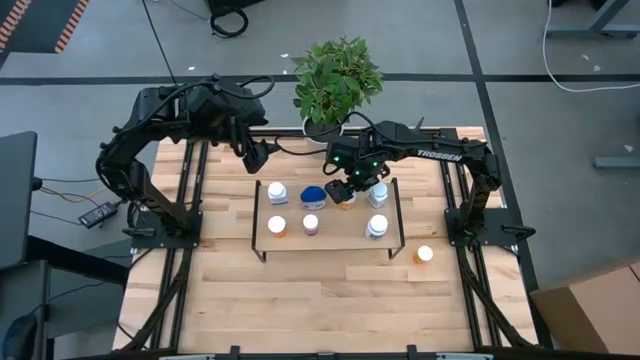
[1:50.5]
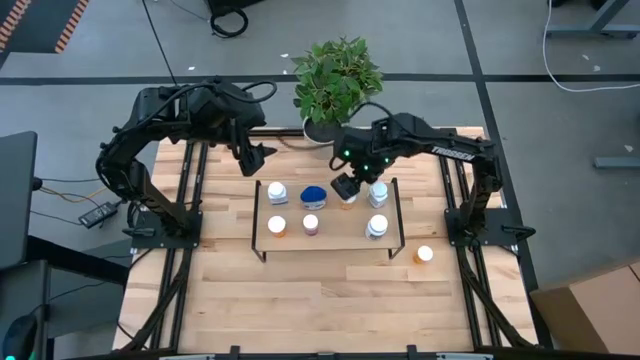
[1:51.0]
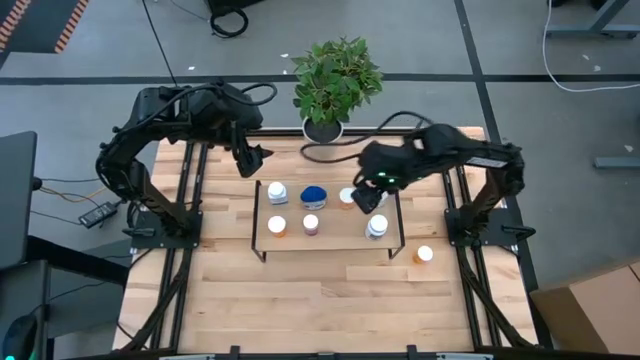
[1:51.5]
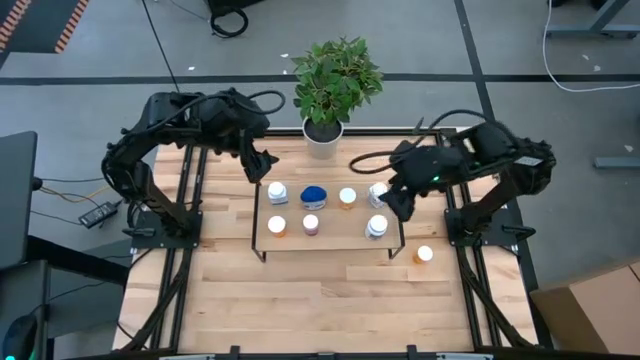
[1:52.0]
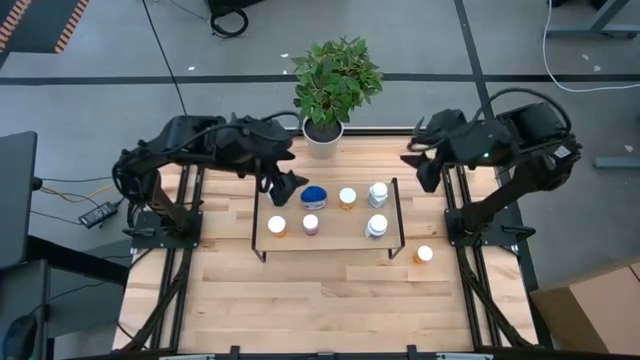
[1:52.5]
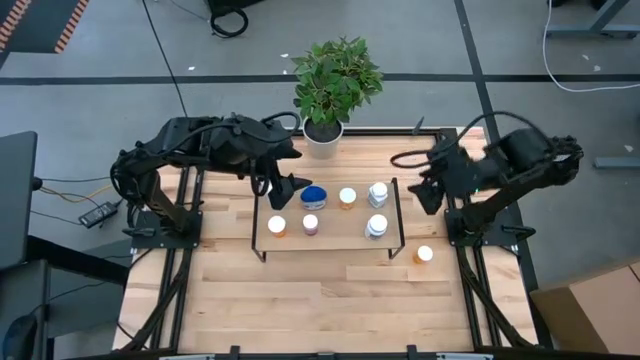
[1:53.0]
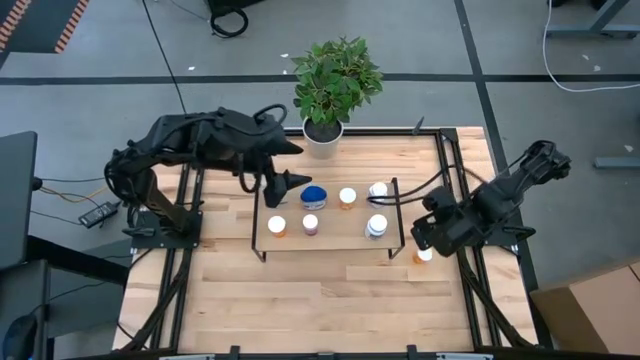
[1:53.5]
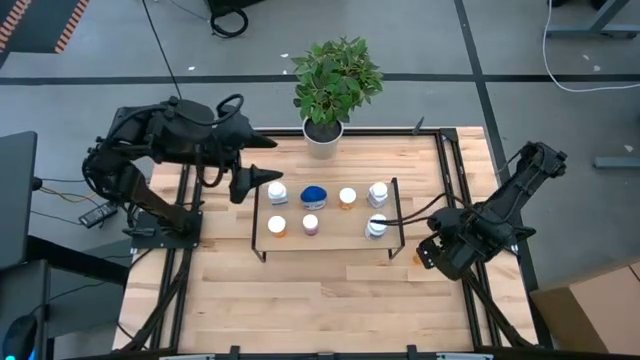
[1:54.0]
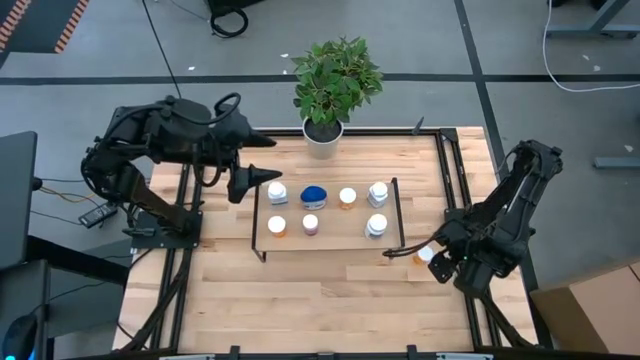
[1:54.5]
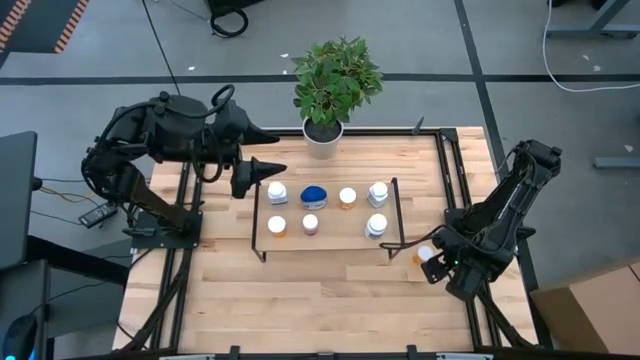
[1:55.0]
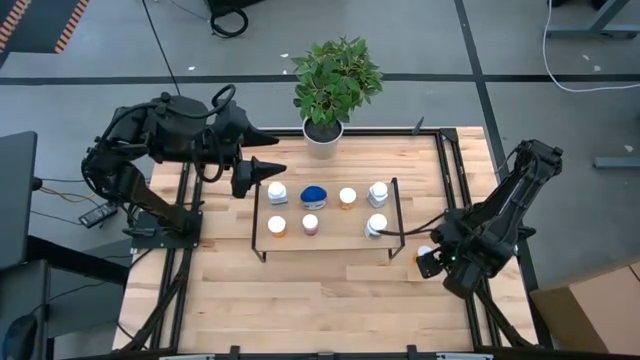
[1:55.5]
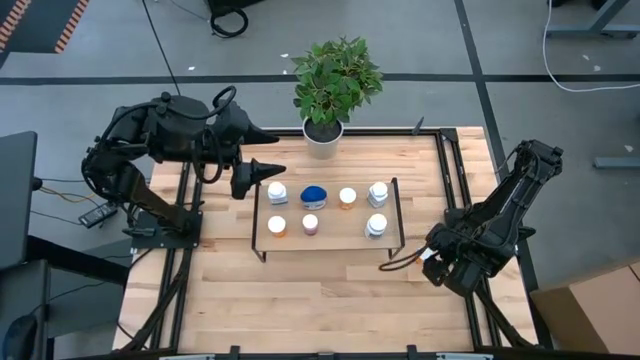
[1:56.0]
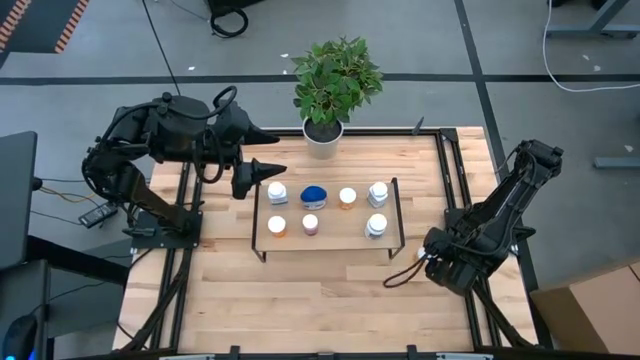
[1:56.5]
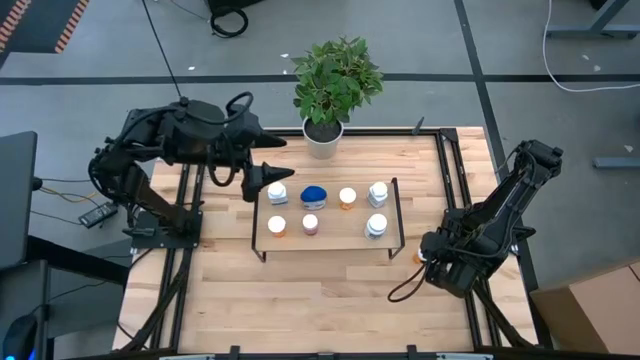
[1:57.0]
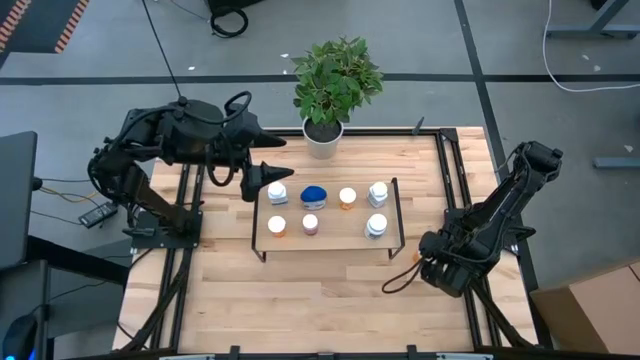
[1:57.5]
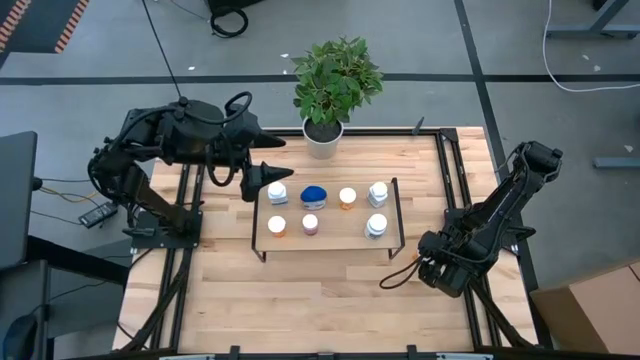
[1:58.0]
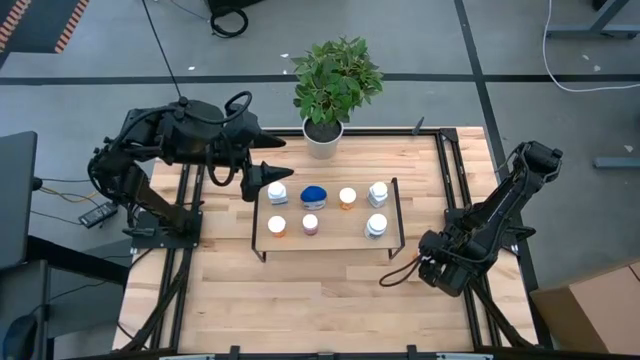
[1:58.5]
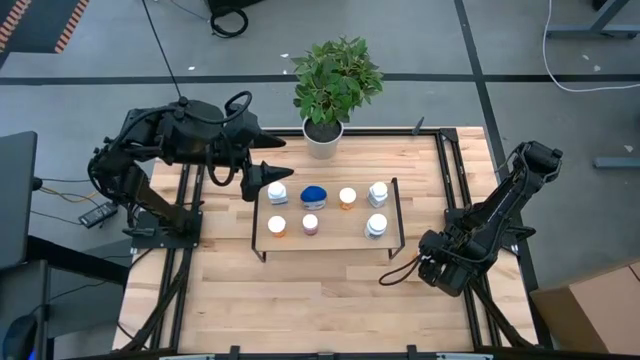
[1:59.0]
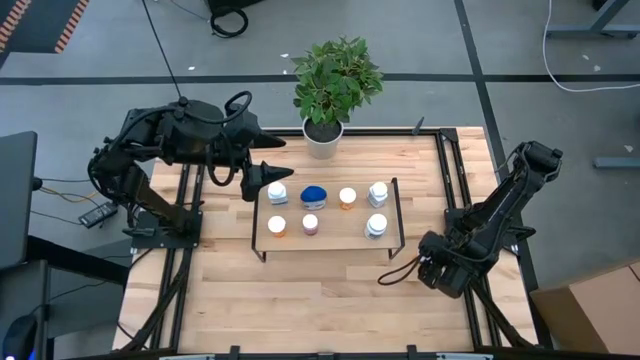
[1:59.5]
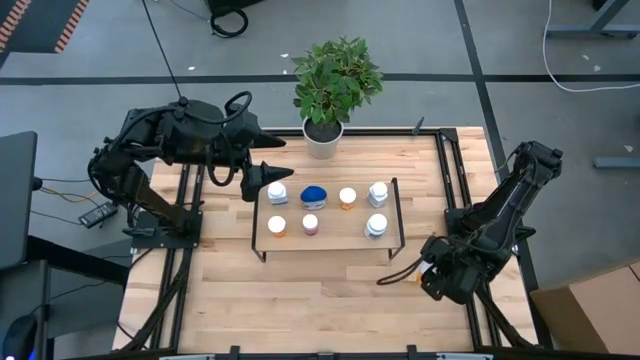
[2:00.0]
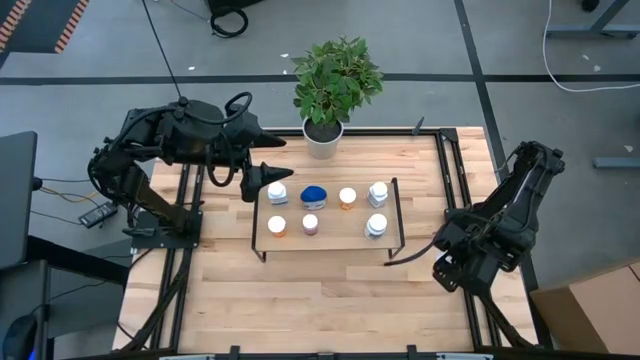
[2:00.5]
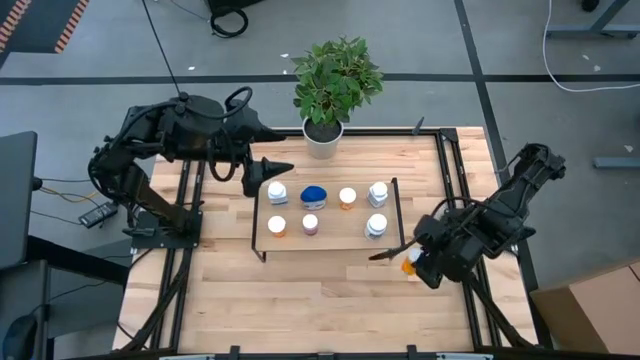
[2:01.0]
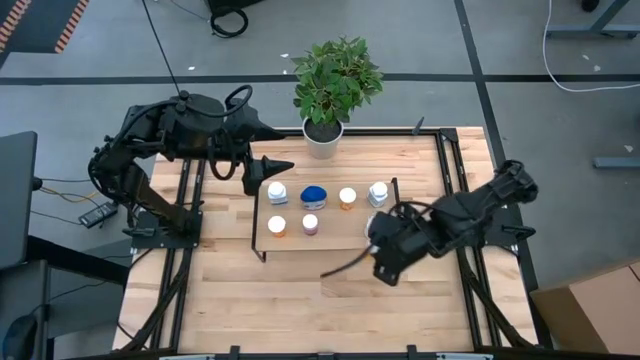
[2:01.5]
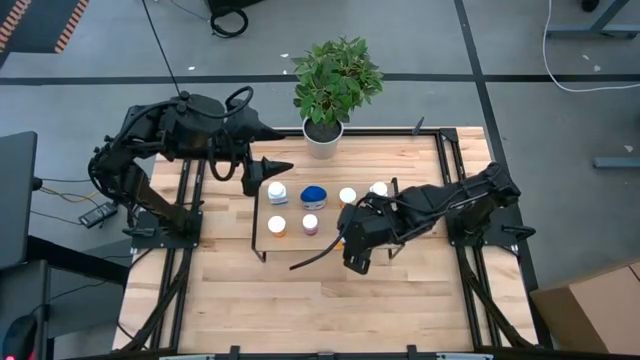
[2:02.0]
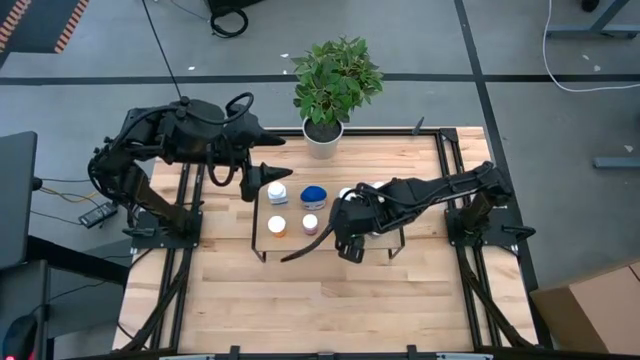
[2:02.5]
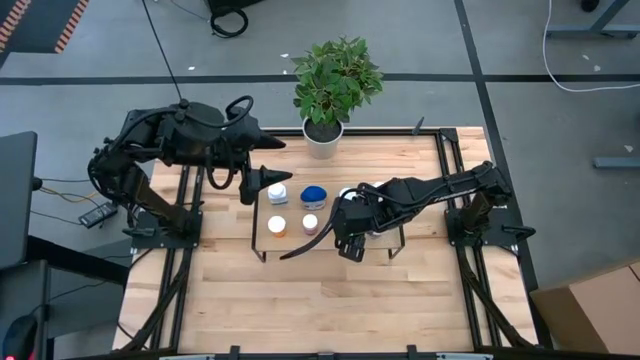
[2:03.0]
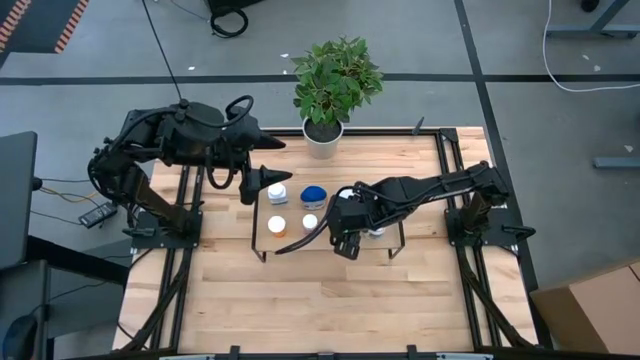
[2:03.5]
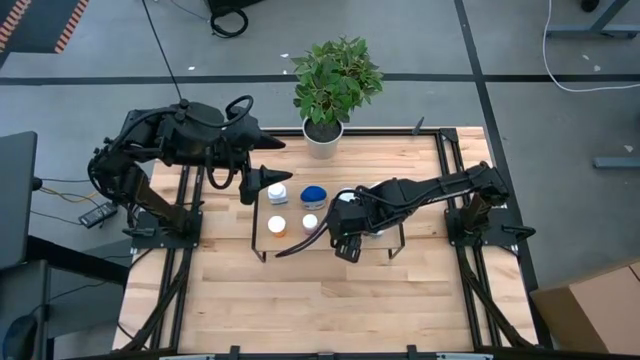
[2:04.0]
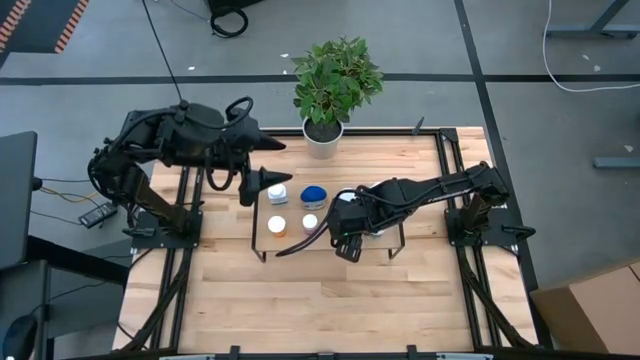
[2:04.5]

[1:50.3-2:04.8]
Task: Pick and place medicine bottles onto shelf by color
Put the orange pill bottle on the shelf

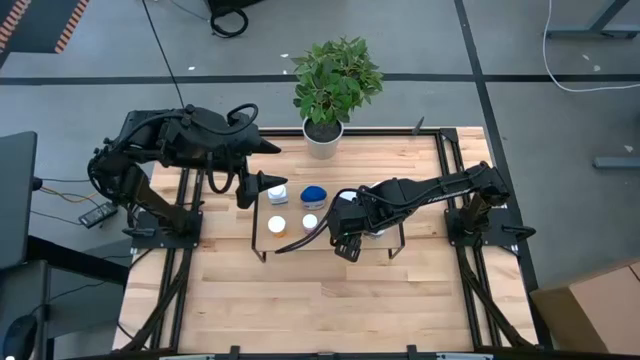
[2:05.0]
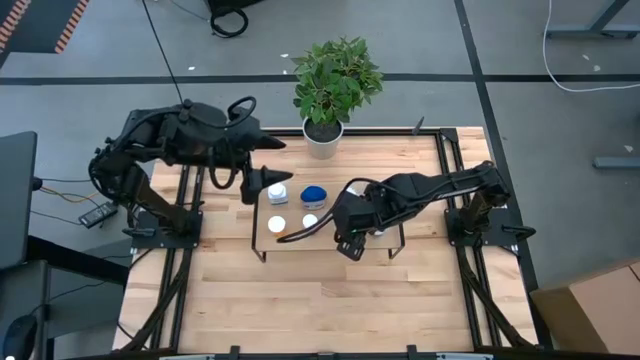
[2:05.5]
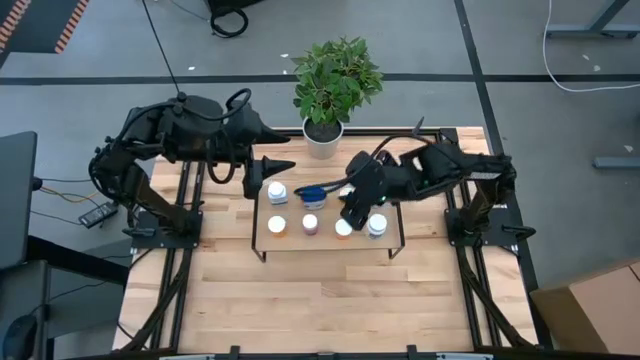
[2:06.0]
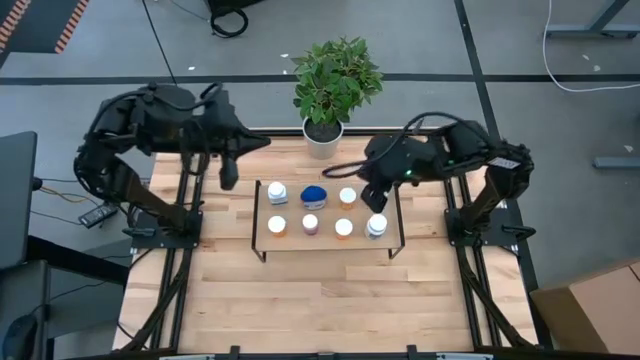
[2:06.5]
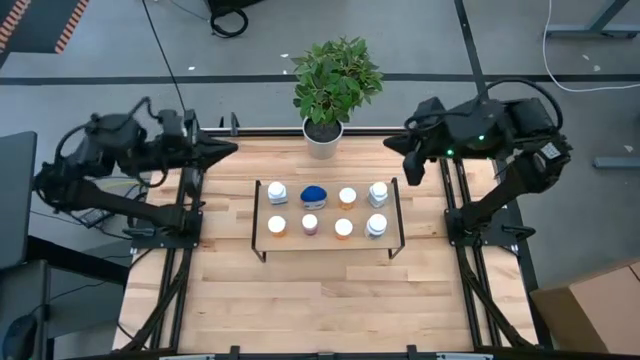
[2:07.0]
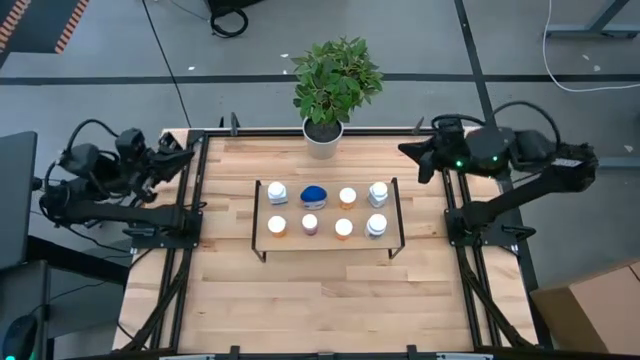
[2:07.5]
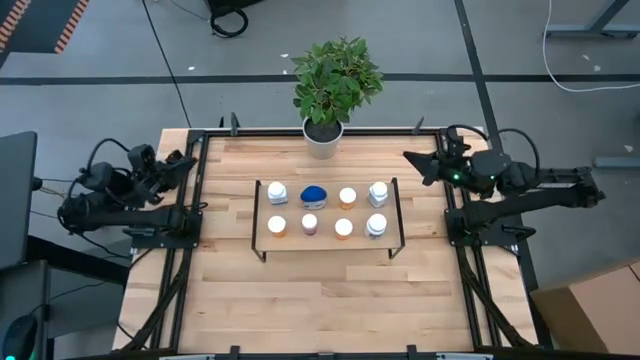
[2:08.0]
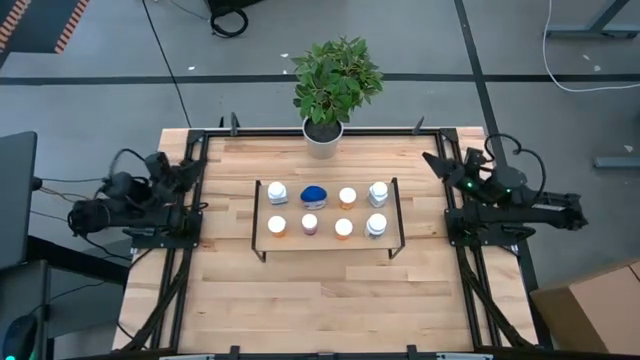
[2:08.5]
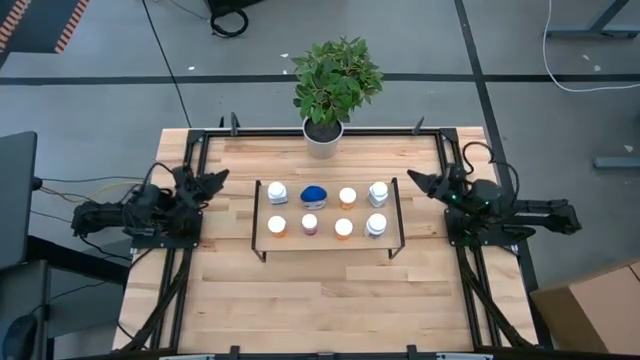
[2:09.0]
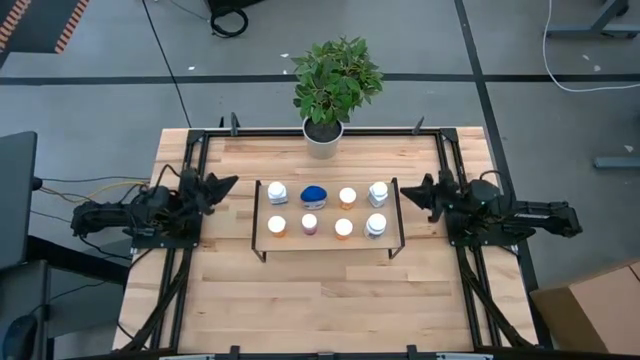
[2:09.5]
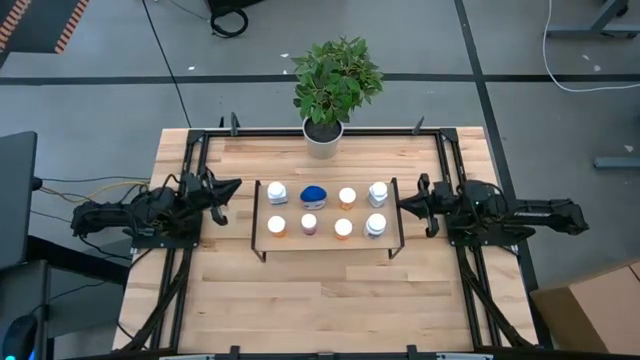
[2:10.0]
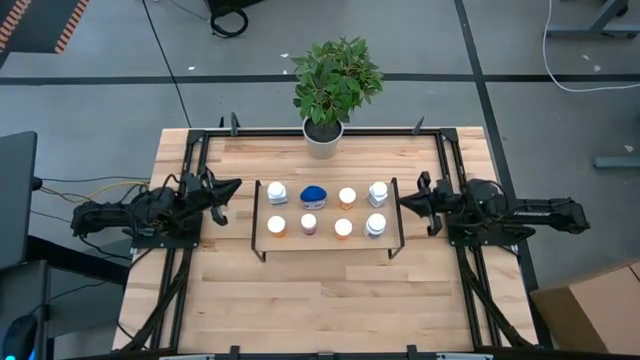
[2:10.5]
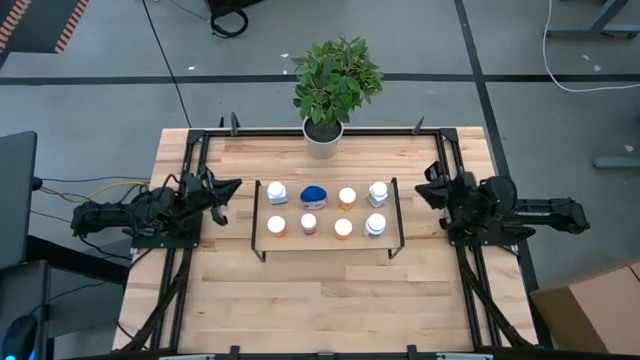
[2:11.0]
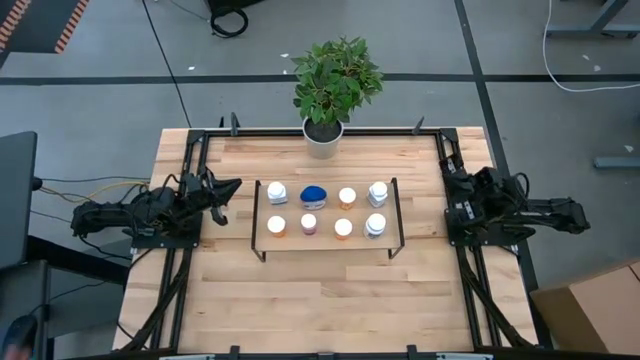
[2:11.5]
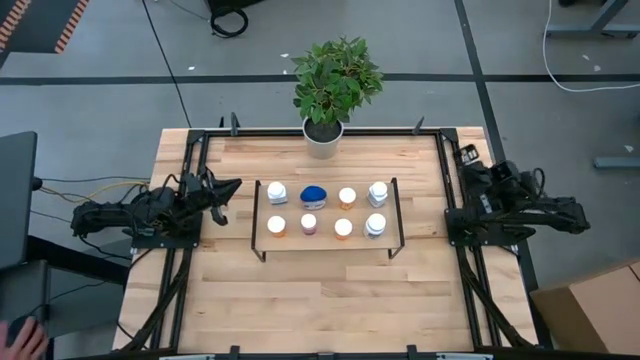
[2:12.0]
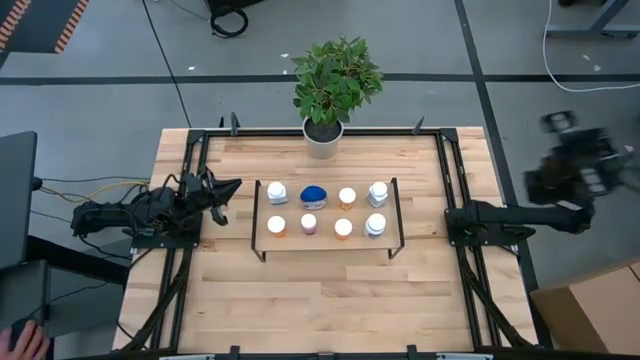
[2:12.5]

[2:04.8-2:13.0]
Return to Home Position
